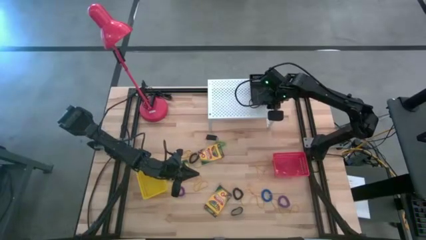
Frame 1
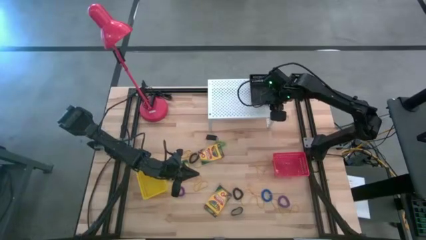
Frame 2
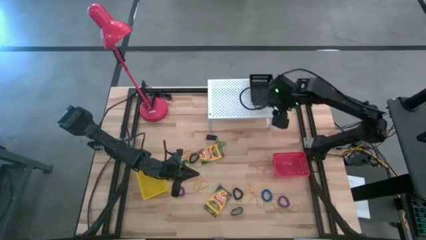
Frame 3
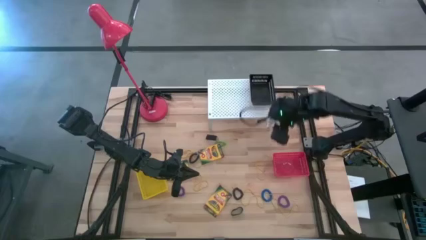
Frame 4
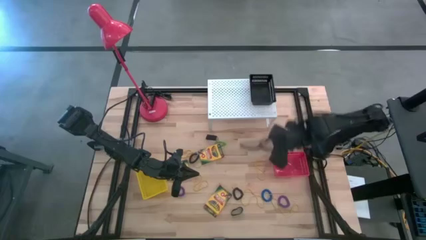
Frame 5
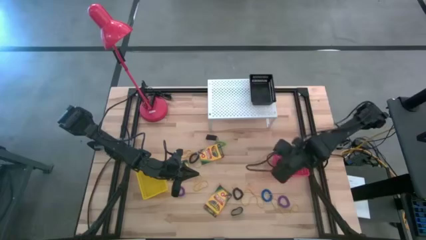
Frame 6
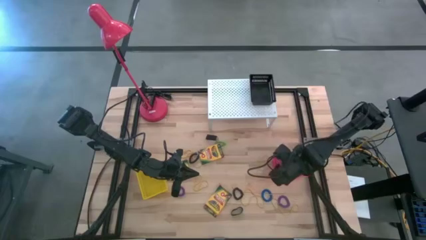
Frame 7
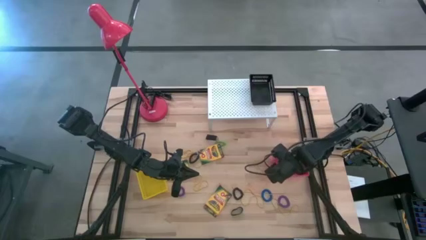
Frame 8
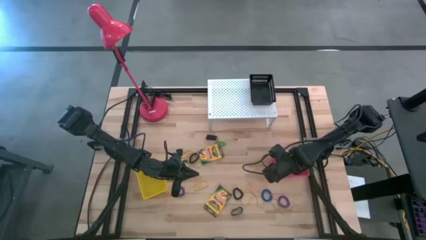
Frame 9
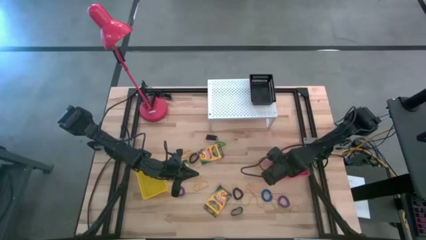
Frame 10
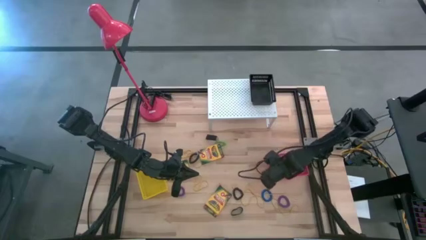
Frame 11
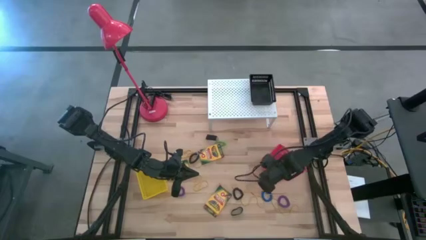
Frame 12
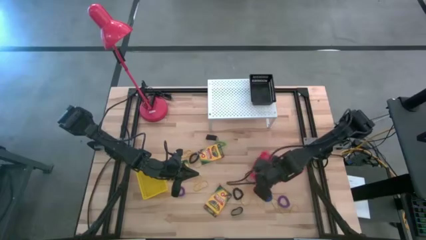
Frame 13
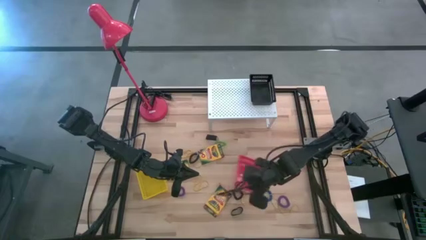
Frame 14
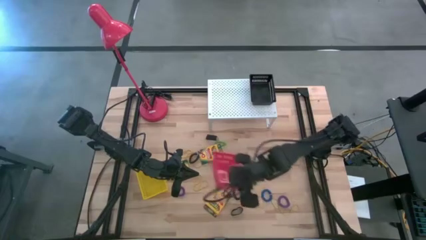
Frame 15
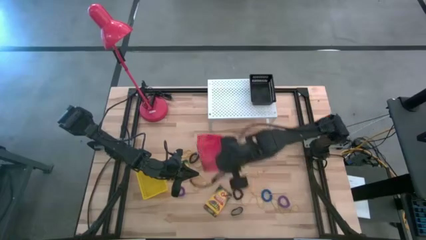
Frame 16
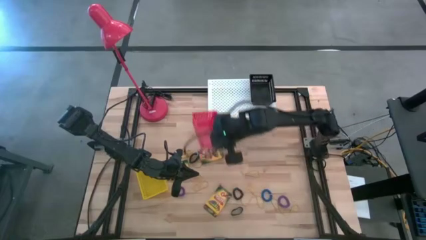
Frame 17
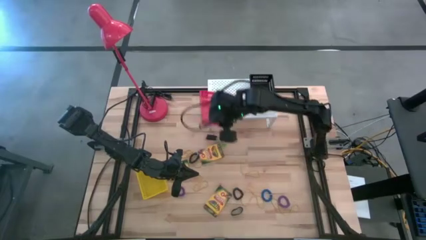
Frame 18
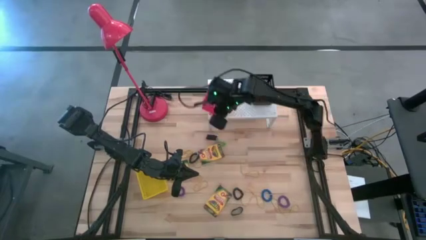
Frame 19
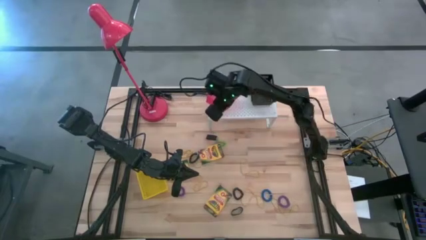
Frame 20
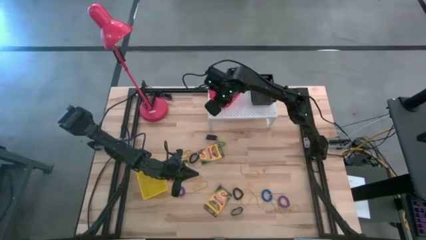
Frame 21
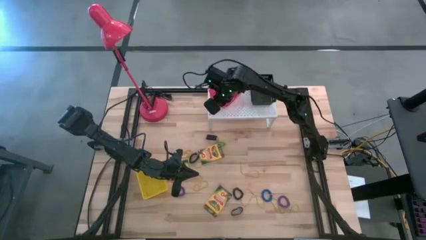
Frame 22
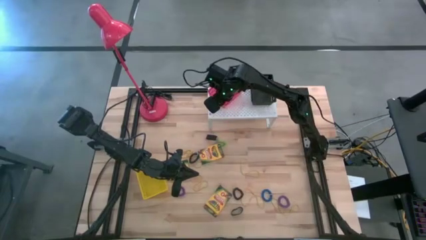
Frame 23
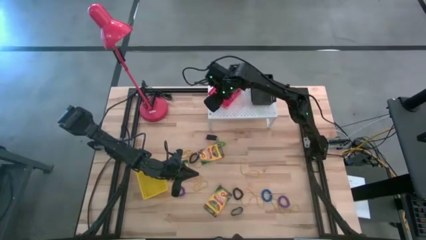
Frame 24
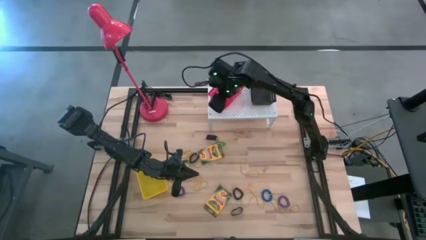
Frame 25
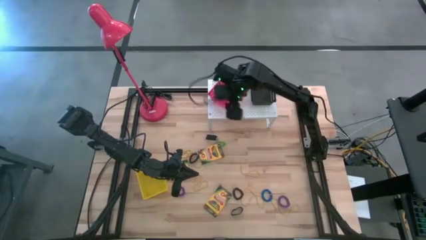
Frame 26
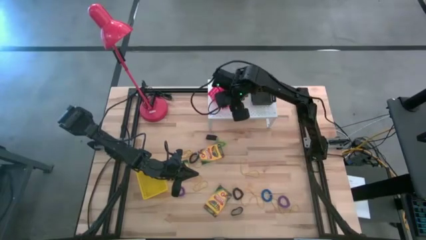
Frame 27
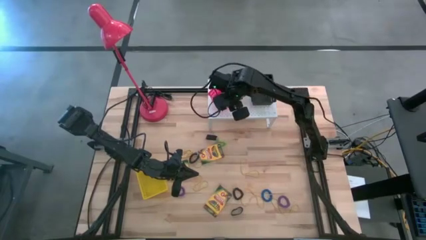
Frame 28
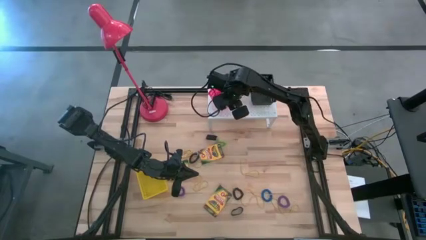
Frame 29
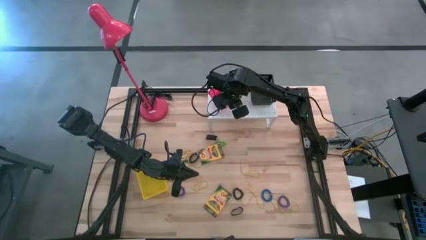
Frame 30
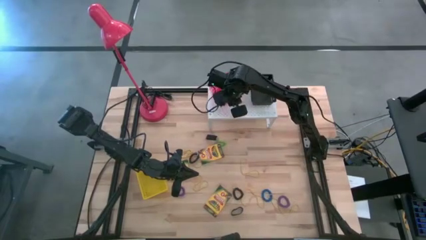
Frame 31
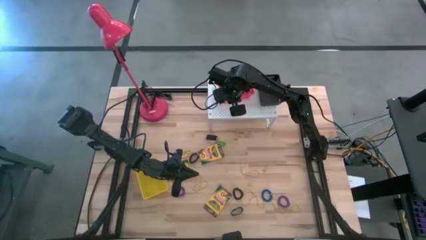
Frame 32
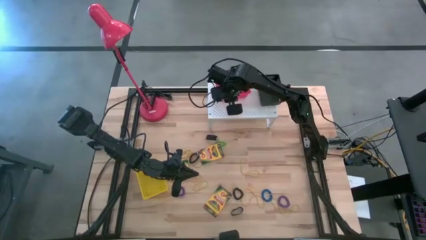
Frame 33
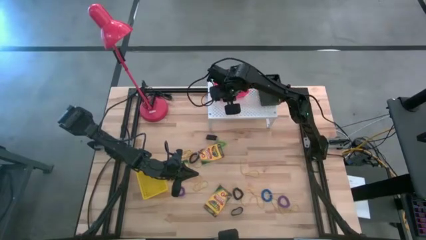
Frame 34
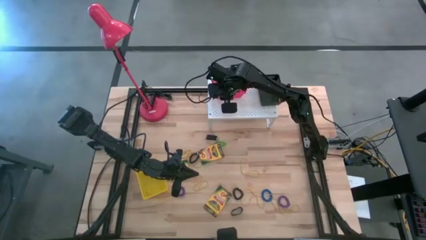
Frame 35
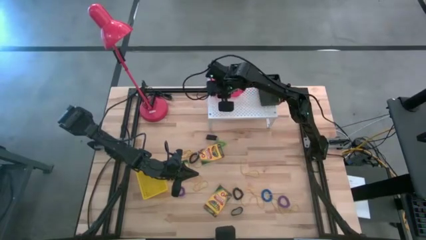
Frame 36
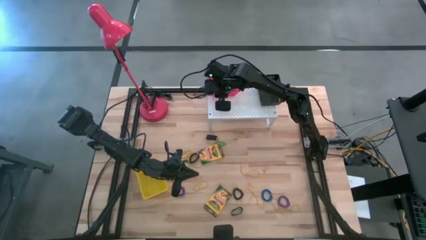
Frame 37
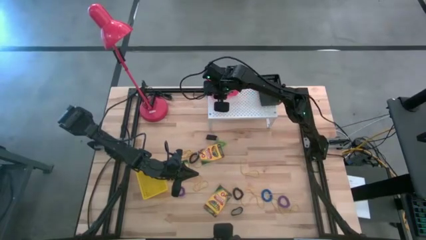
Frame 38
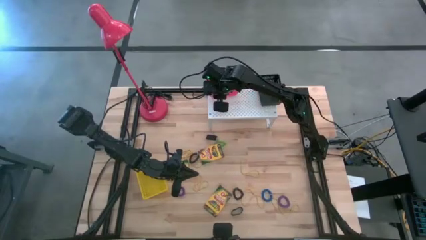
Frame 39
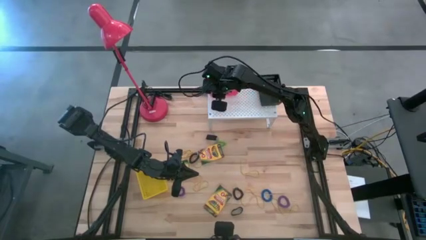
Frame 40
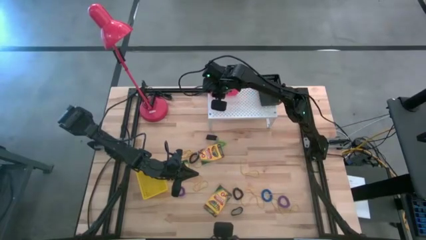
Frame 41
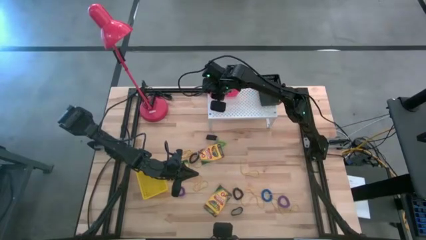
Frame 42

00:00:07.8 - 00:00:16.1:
Task: Pick & Place Office Desk Supplies
Put the red bin on the shelf

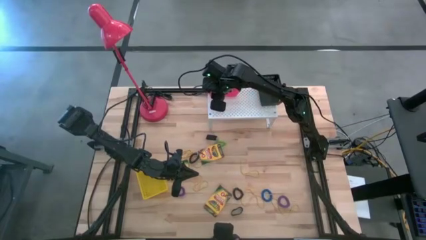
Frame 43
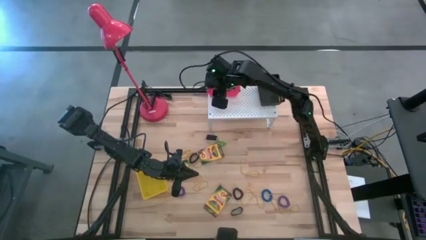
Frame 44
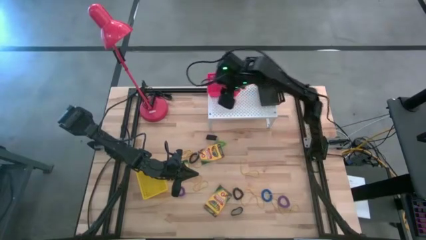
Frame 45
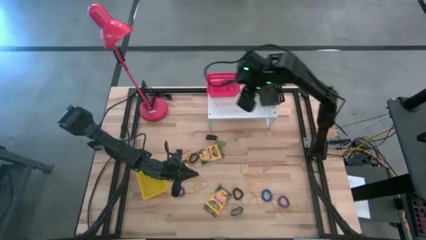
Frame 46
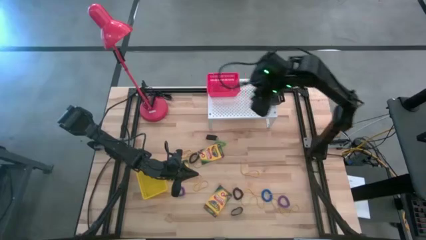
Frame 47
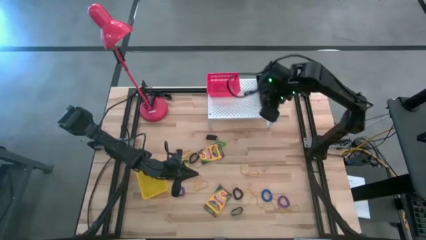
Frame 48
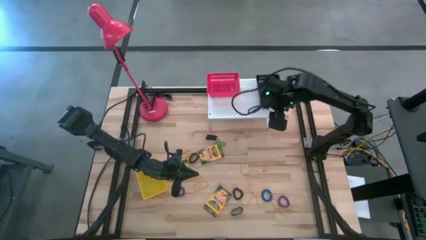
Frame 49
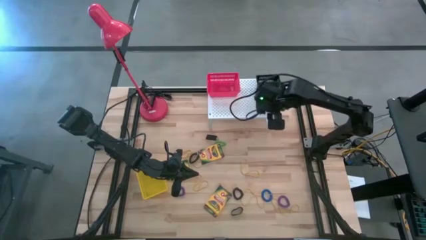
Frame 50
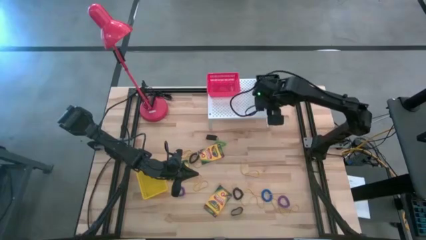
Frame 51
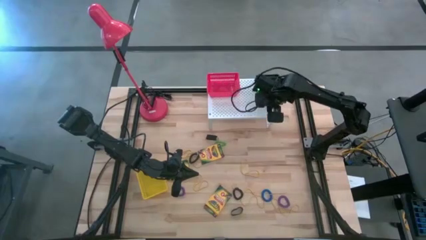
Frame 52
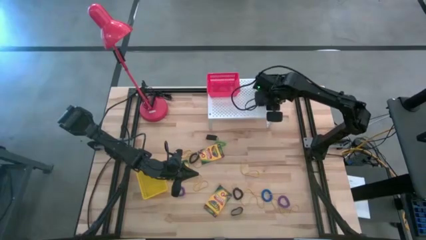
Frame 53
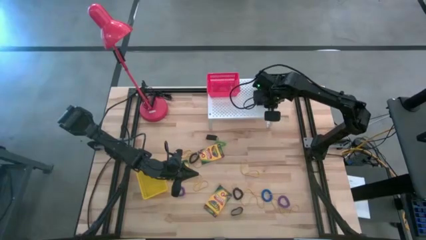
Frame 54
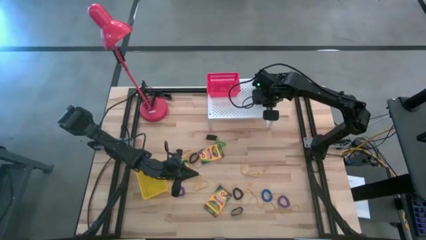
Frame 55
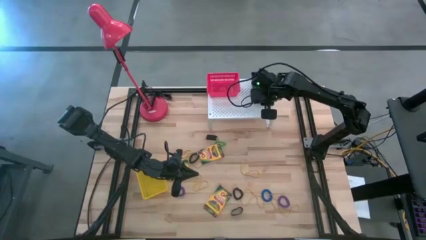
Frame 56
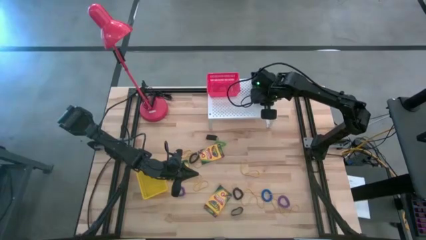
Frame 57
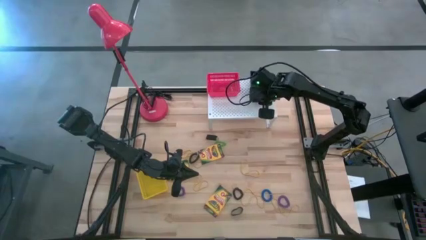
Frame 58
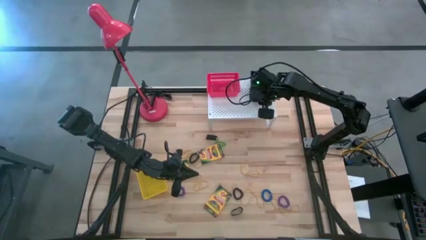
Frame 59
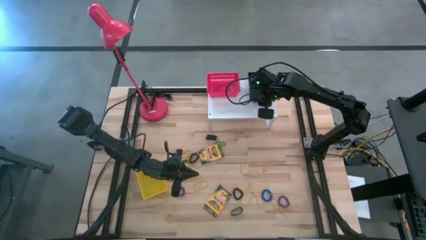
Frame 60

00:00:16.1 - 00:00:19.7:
Adjust the black bin on the shelf

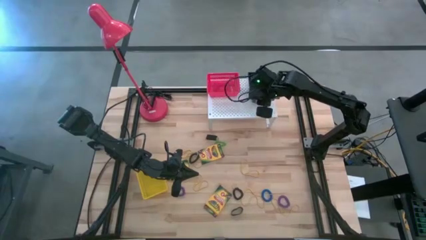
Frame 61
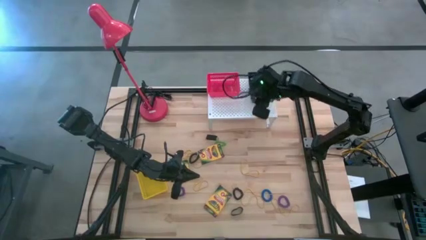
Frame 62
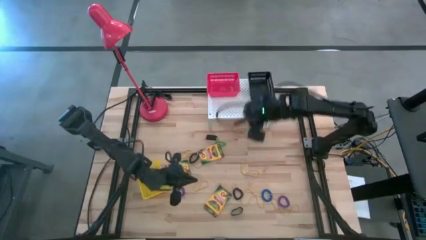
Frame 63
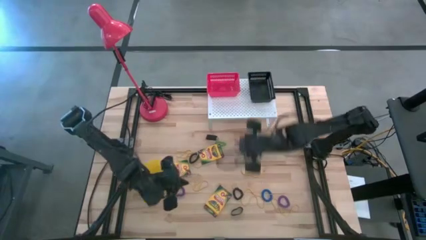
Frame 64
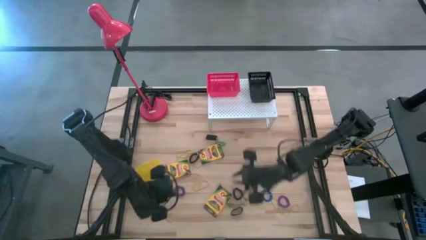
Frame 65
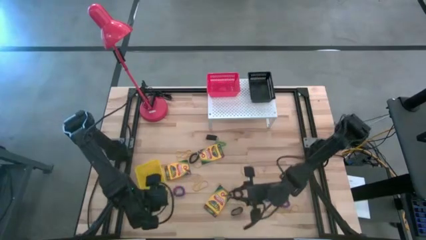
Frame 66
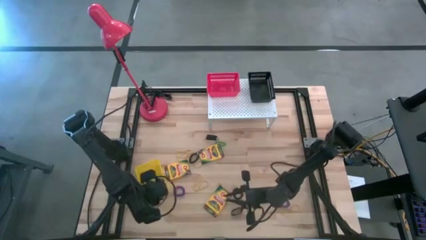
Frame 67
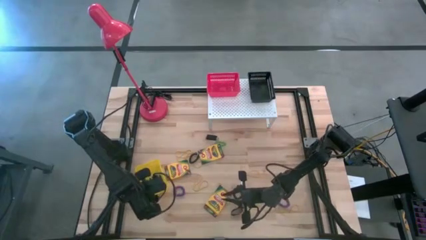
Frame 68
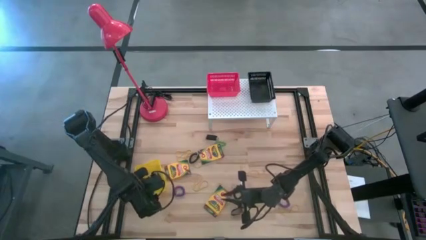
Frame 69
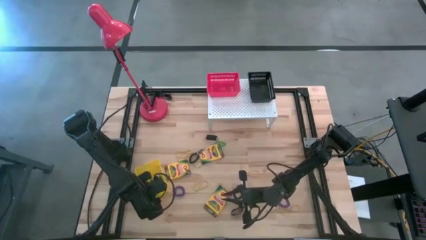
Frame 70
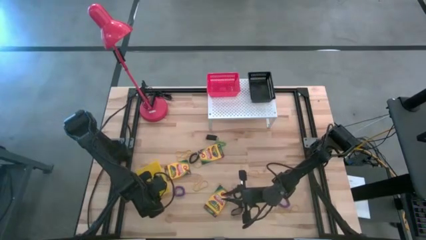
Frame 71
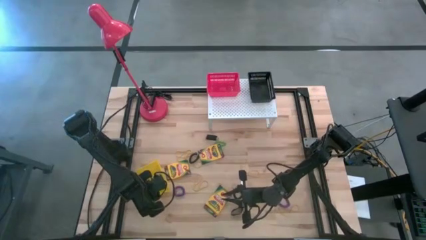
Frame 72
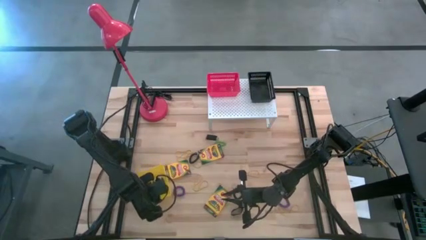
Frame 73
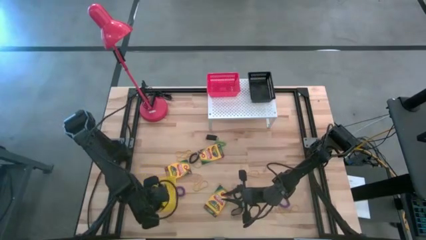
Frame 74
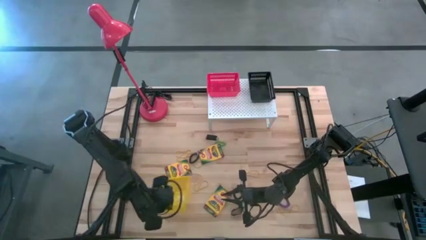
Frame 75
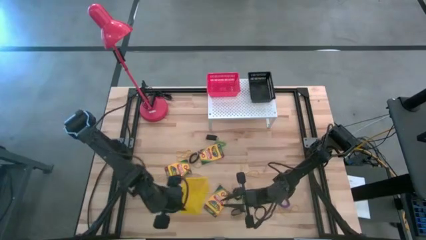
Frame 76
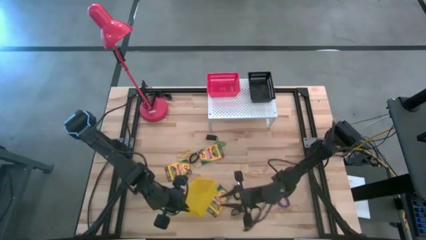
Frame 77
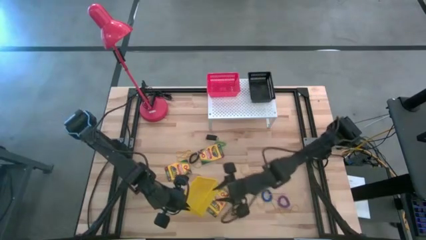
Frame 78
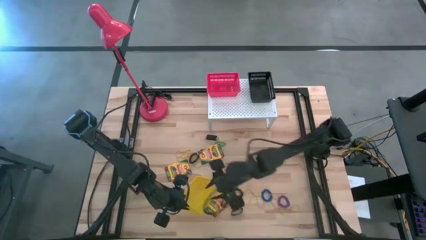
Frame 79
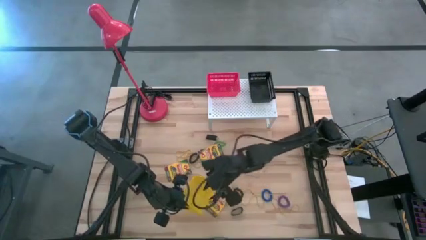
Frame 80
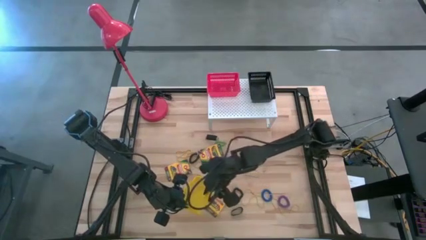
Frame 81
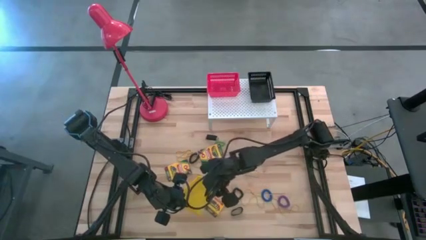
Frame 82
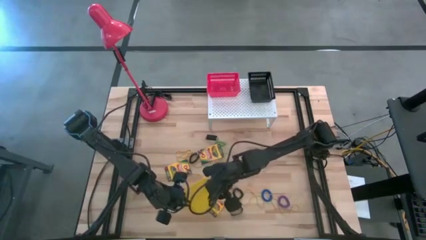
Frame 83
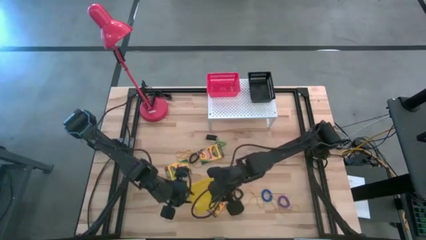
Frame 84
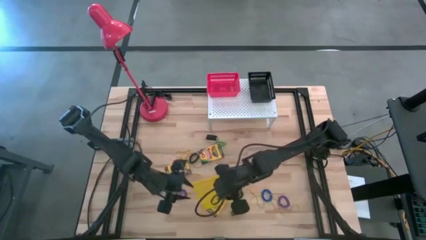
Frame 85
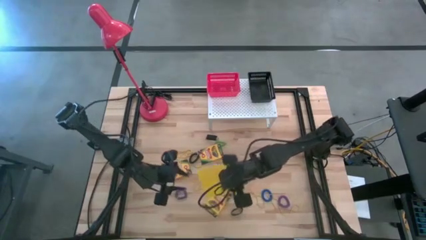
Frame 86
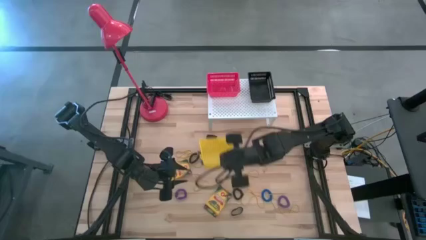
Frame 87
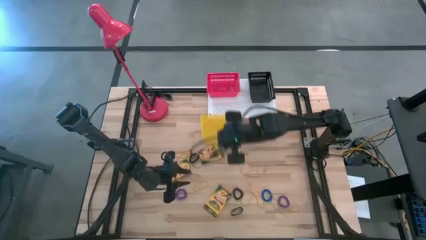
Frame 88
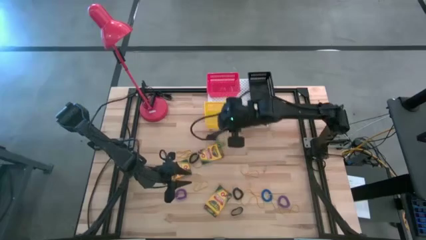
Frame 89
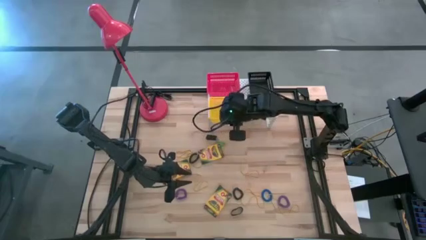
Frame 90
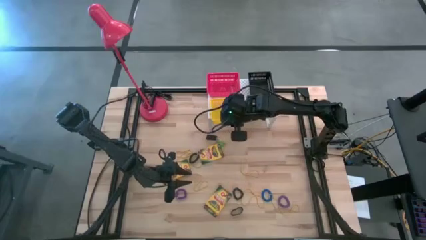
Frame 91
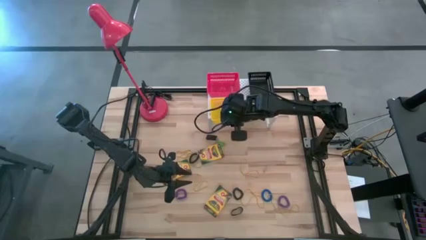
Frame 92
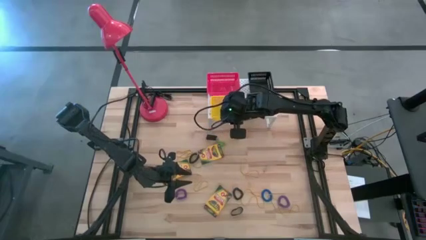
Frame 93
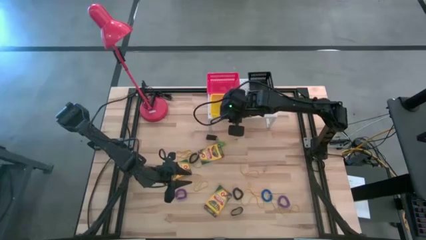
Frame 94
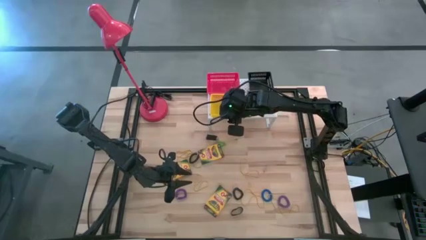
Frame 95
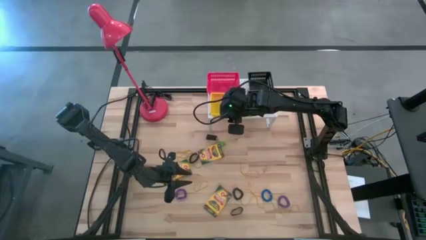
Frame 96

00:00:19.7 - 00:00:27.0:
Put the yellow bin on the shelf
